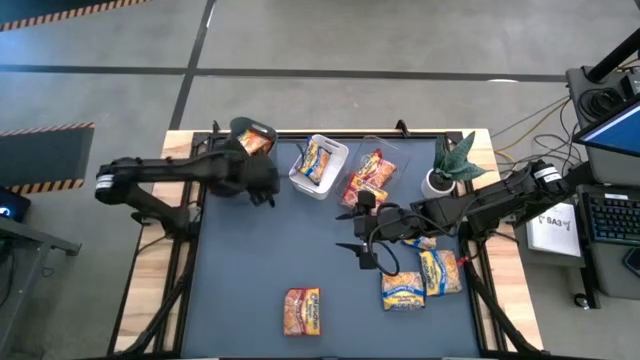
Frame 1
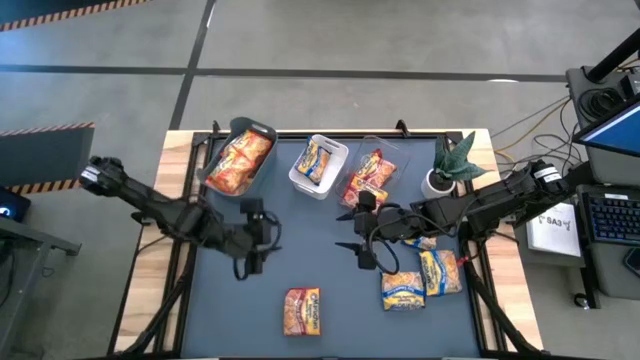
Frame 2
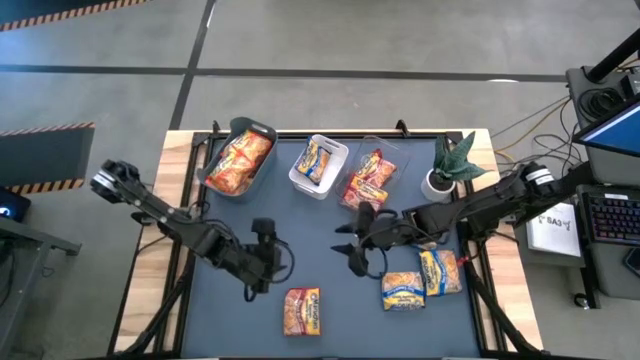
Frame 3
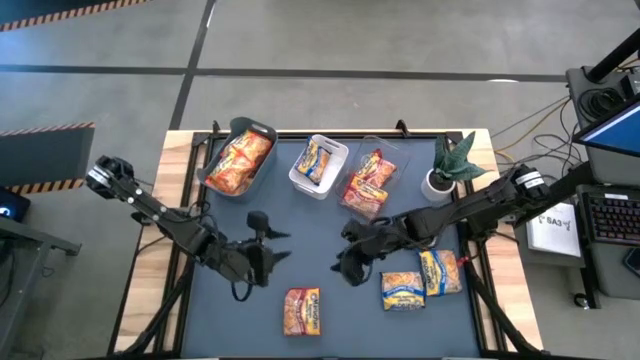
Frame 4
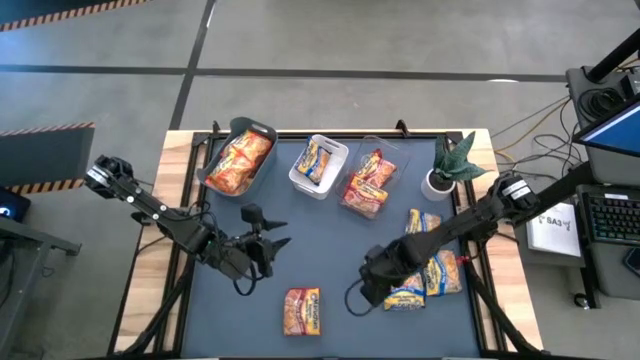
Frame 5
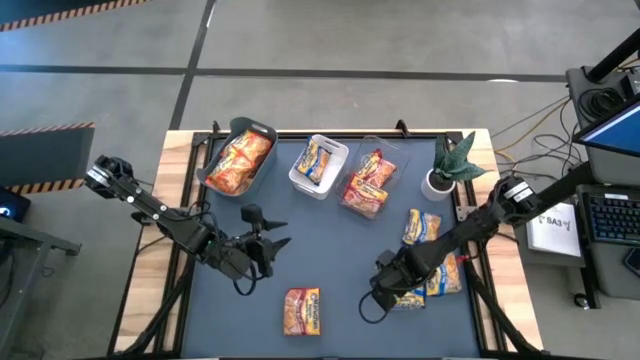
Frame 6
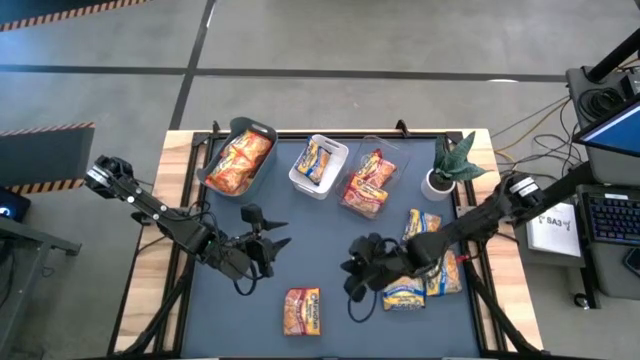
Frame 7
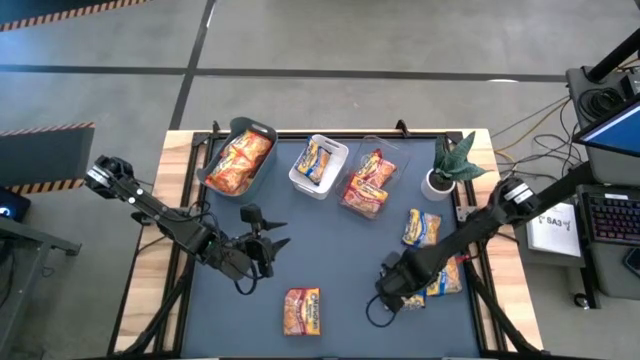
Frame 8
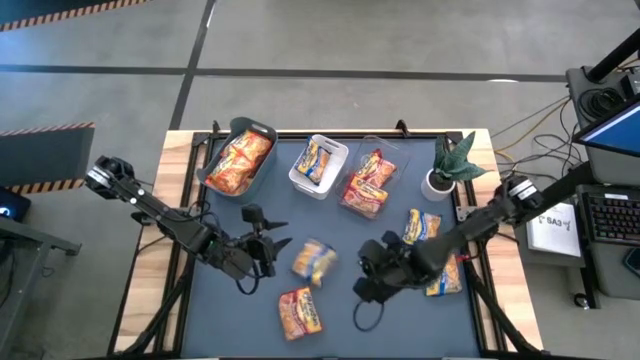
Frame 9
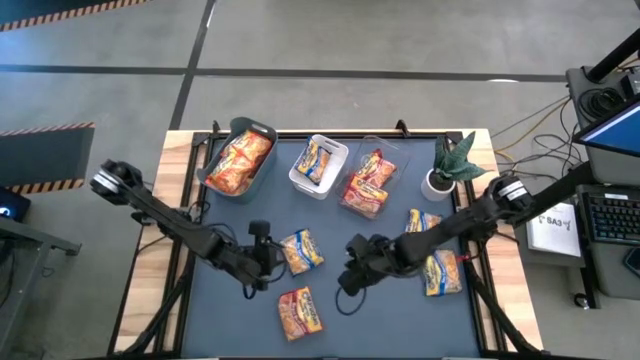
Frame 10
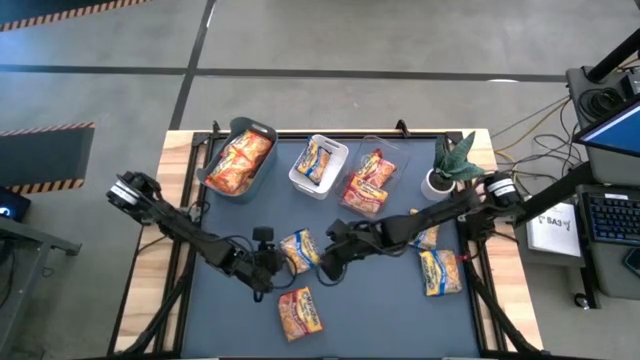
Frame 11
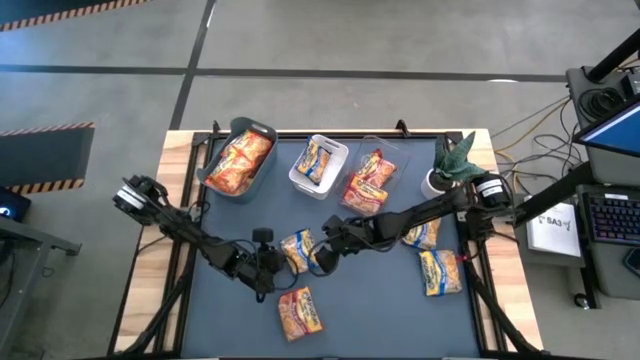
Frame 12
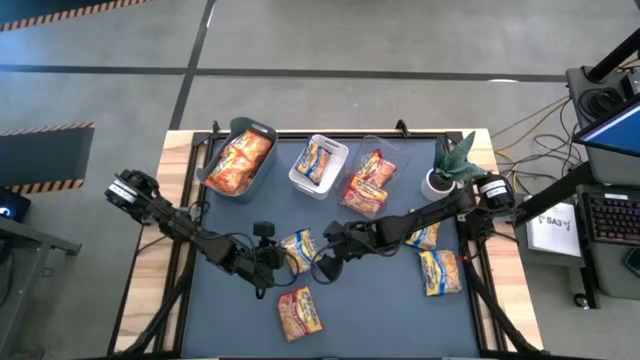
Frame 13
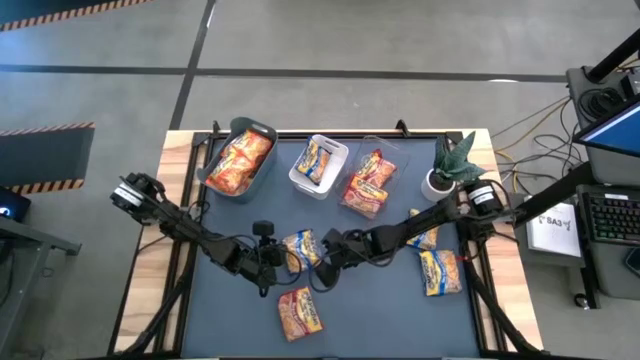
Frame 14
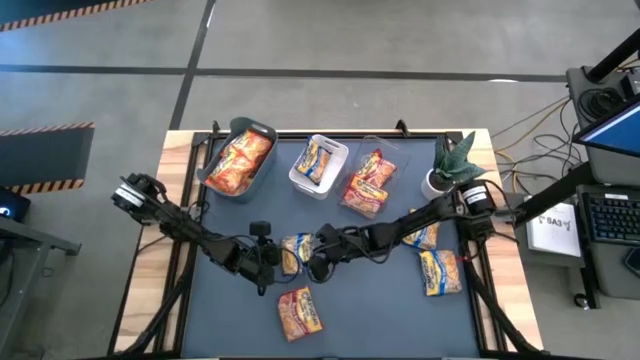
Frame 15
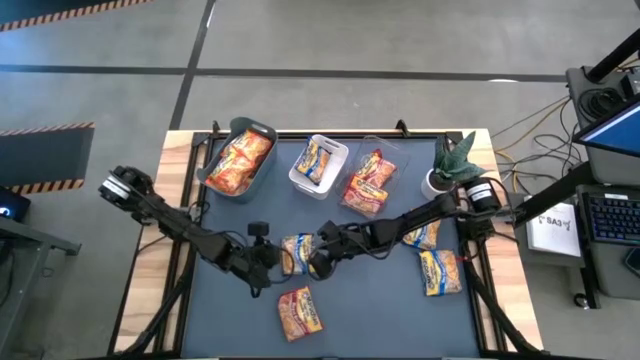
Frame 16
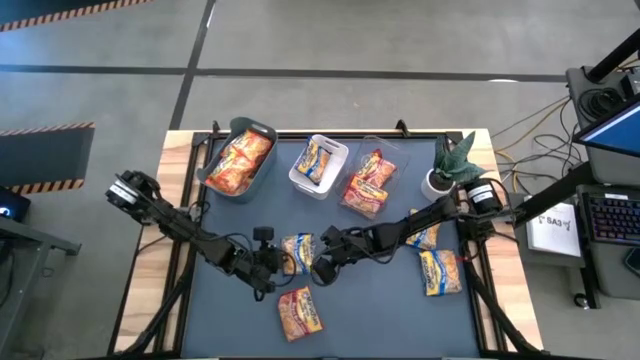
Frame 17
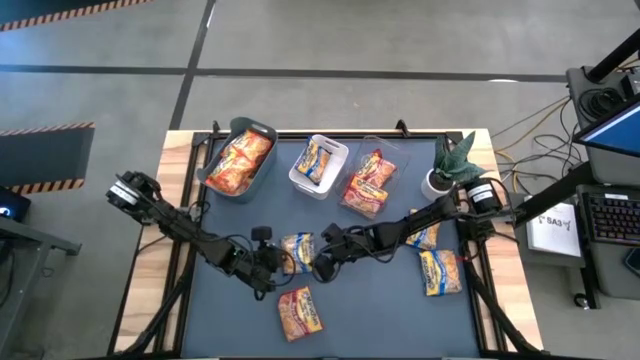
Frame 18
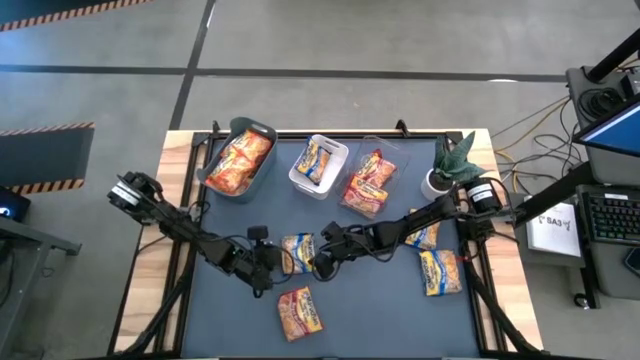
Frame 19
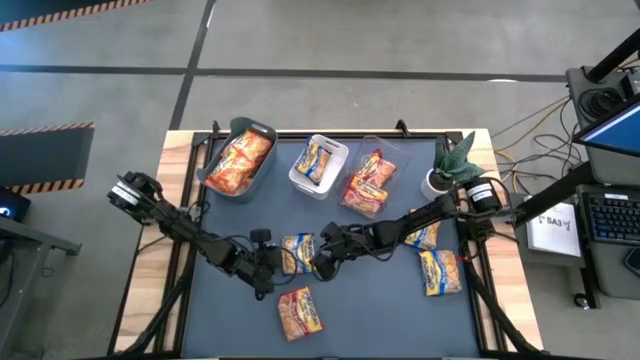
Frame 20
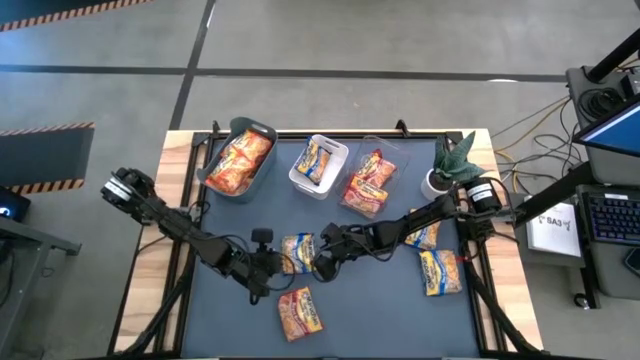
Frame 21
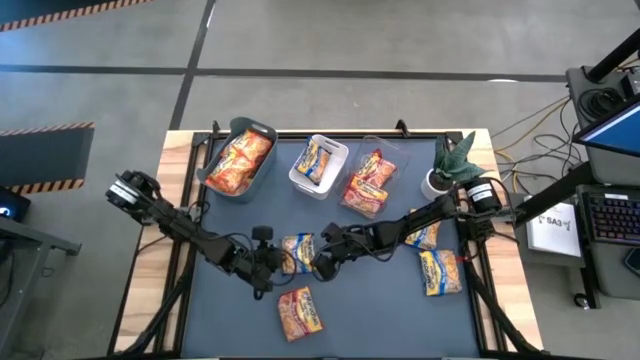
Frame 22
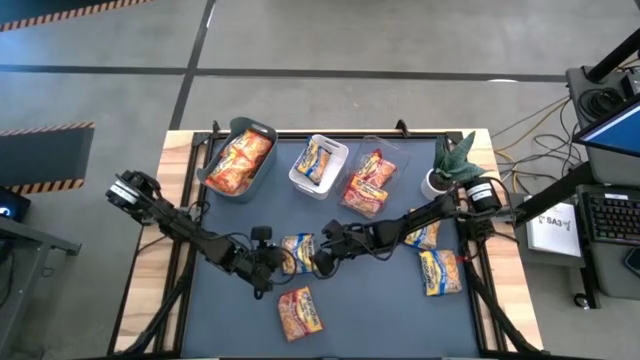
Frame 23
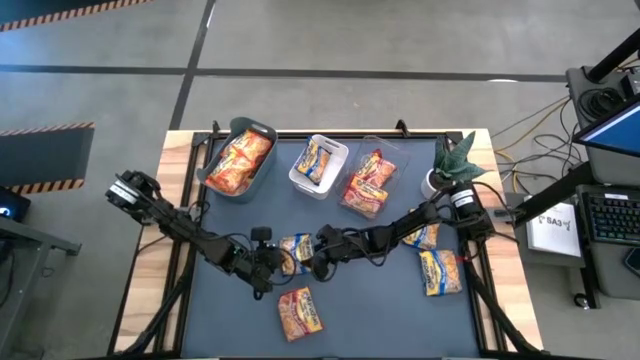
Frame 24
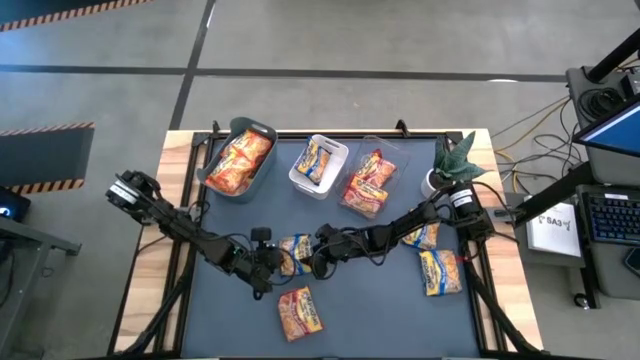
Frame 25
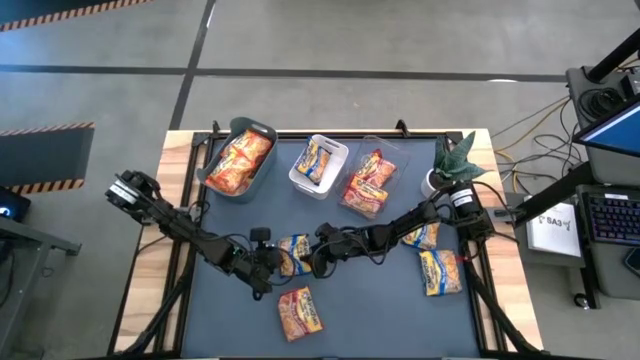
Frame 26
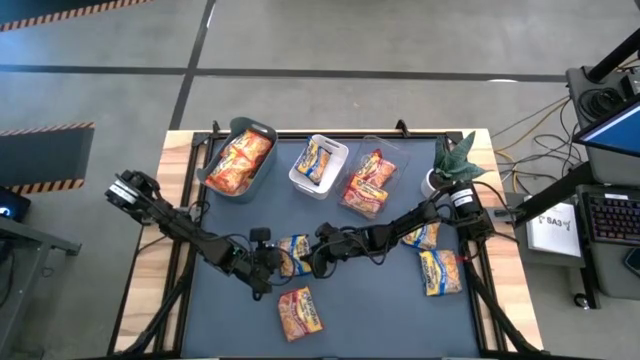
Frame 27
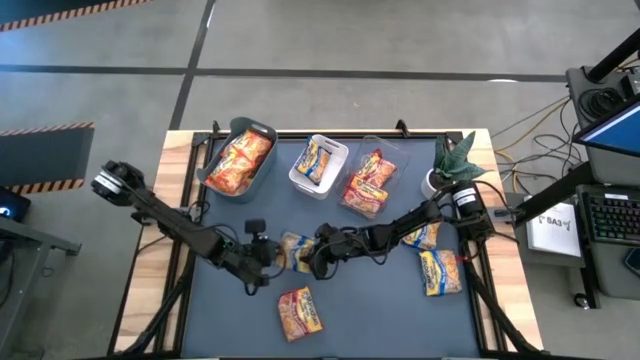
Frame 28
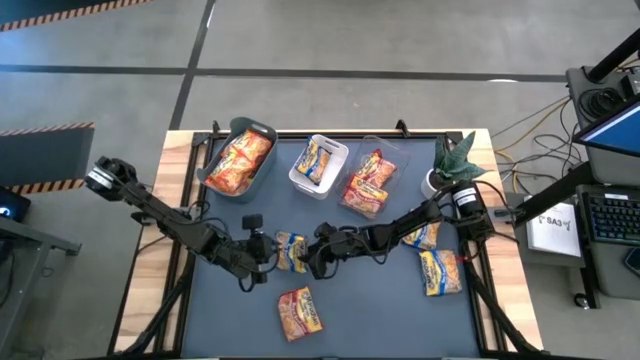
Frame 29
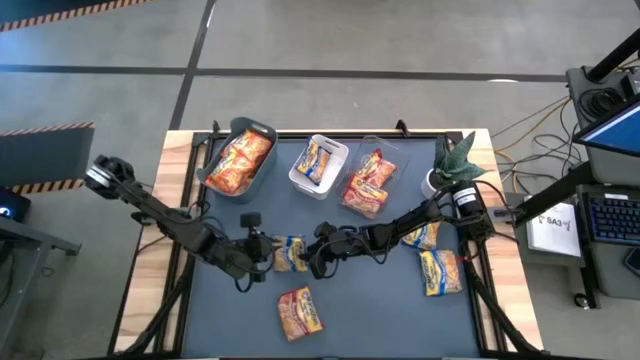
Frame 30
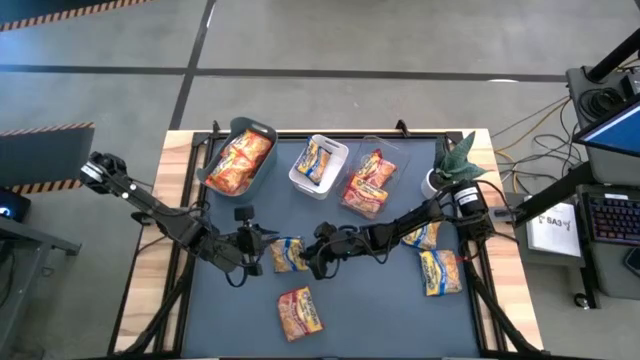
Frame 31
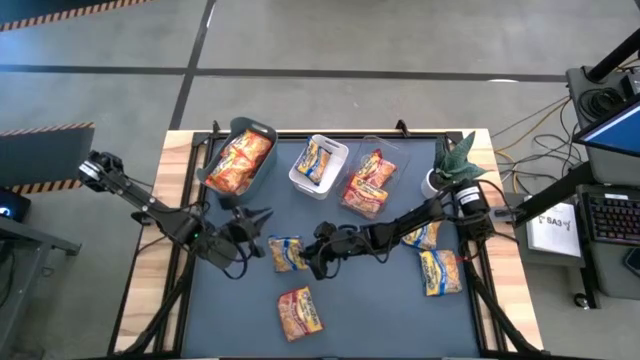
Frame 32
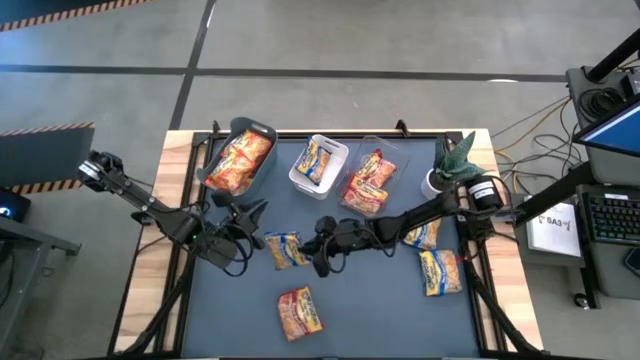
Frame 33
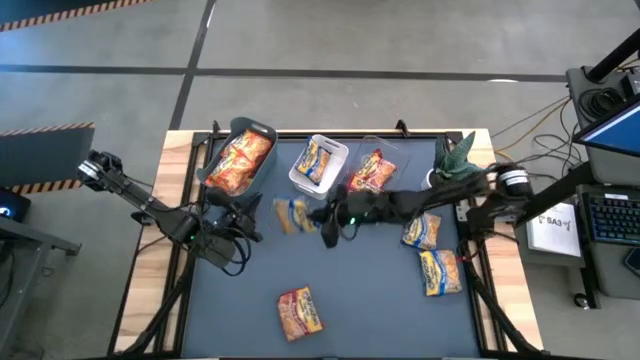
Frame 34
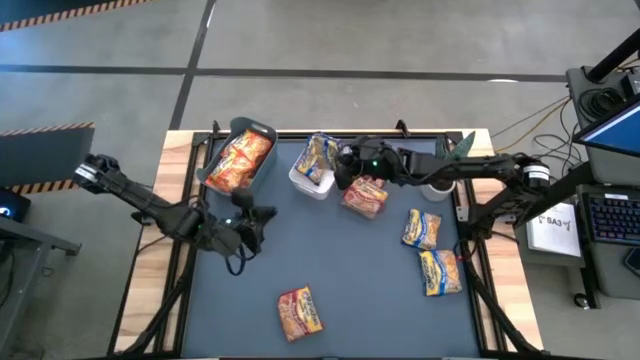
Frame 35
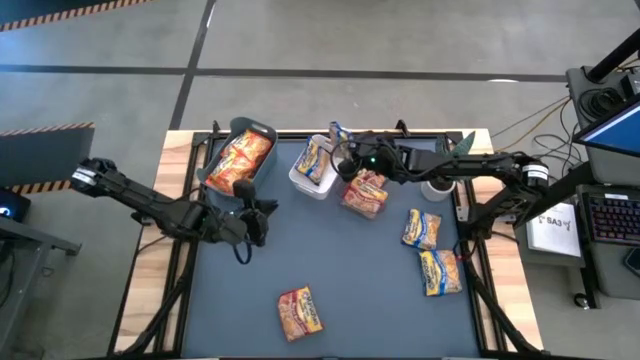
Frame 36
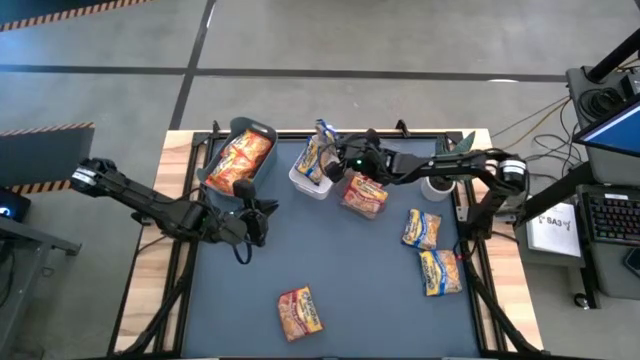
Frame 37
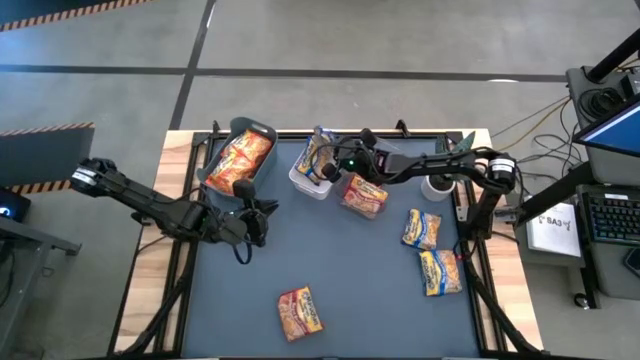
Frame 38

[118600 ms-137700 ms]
Task: Sort Maruchan noodles
Put the blue noodle pack into the white bin

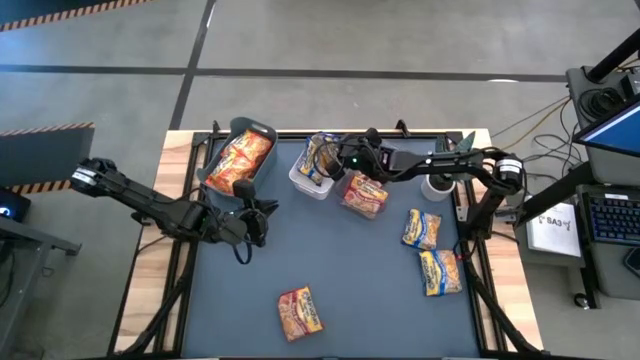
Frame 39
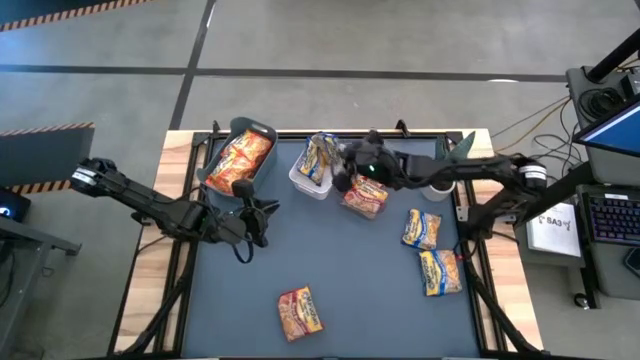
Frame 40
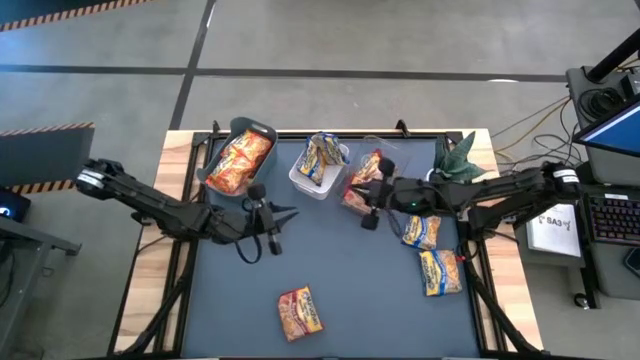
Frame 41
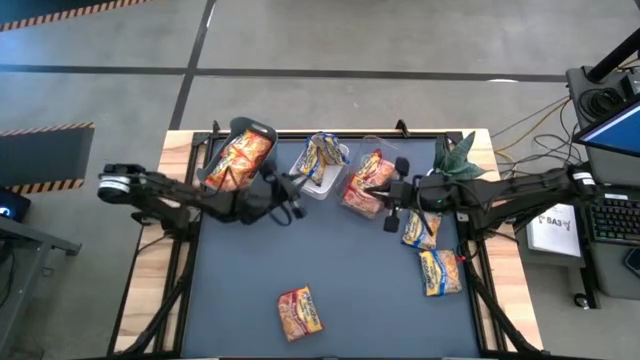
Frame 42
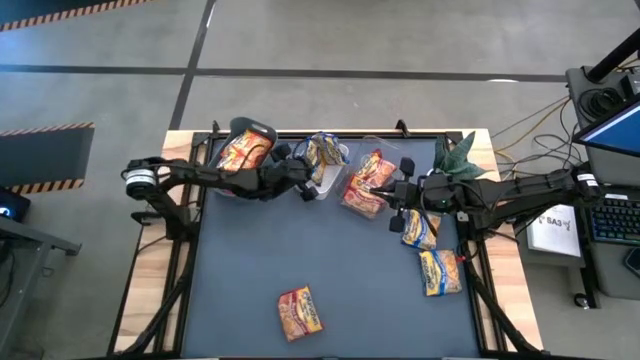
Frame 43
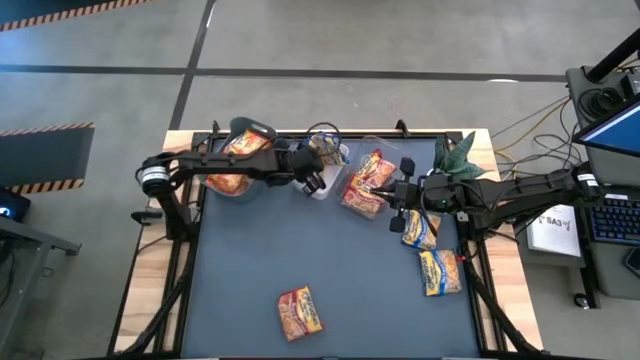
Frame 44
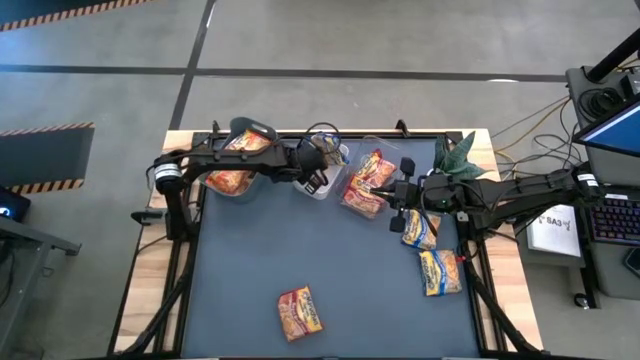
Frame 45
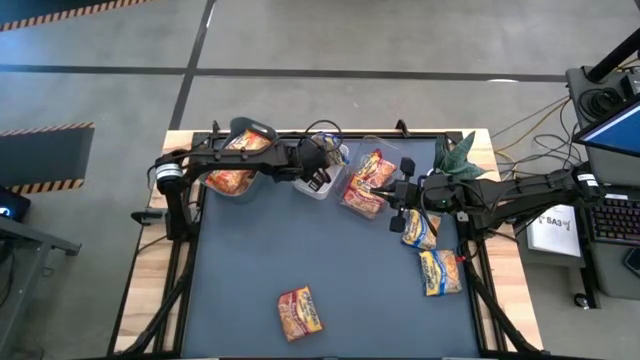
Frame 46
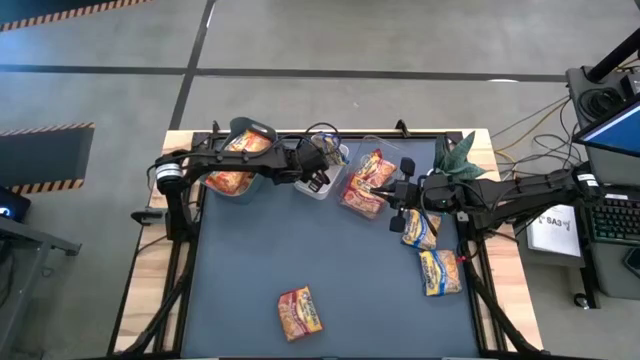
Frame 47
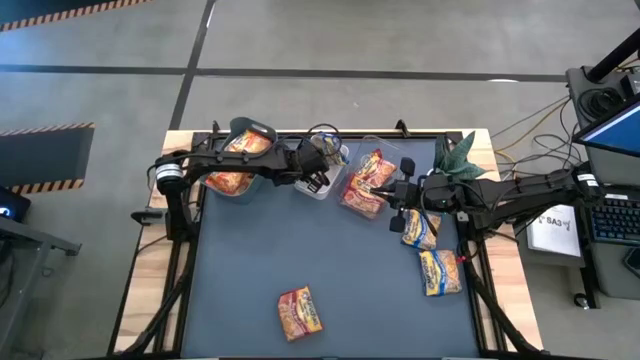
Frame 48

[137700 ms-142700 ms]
Adjust the blue noodle pack in the white bin
